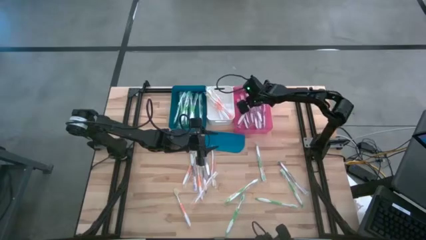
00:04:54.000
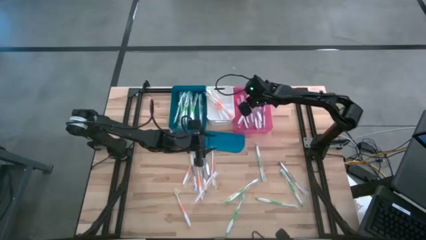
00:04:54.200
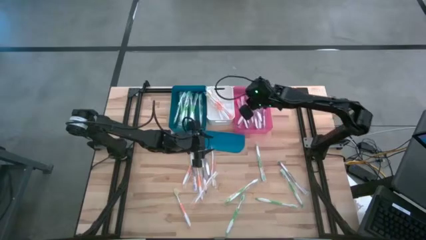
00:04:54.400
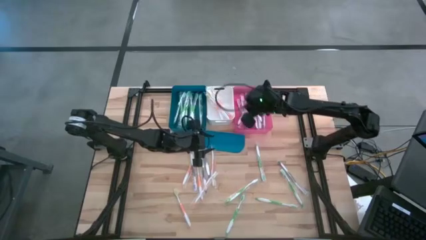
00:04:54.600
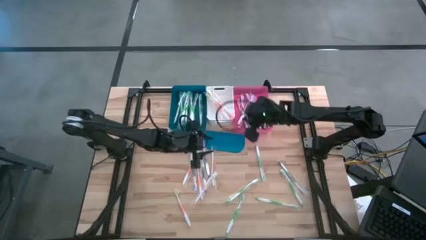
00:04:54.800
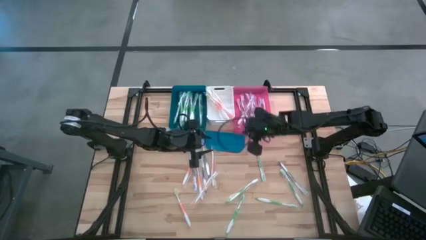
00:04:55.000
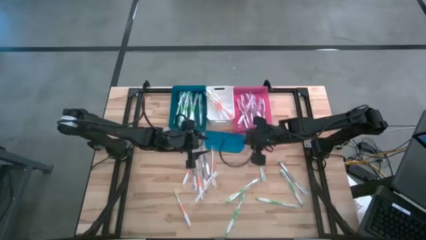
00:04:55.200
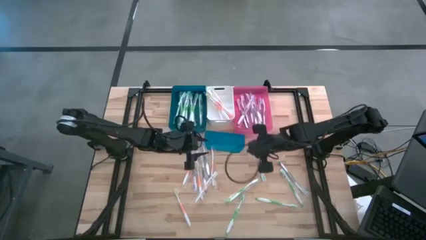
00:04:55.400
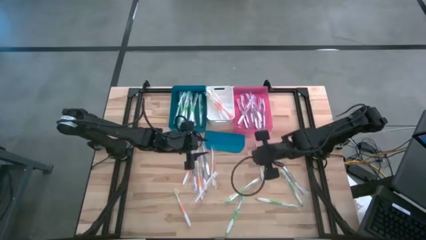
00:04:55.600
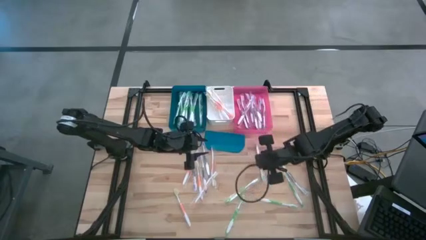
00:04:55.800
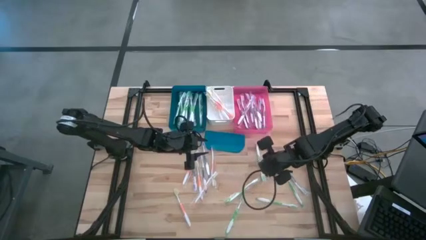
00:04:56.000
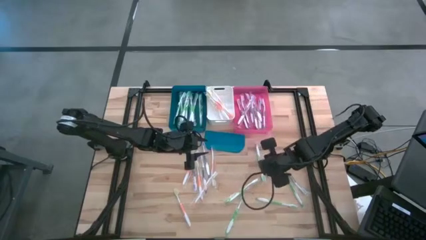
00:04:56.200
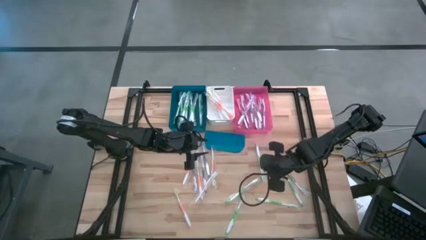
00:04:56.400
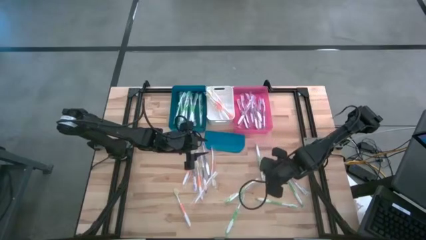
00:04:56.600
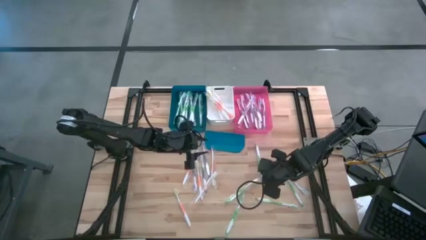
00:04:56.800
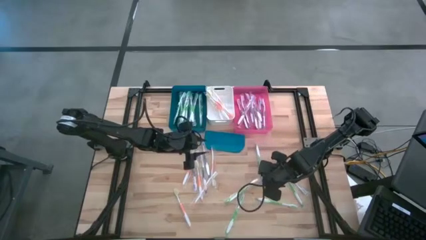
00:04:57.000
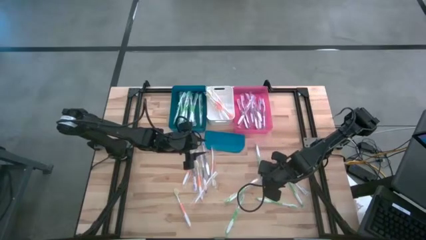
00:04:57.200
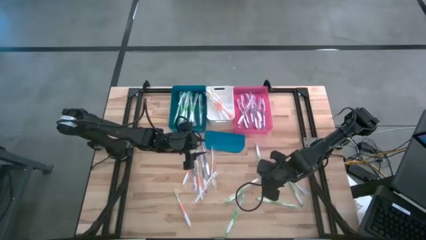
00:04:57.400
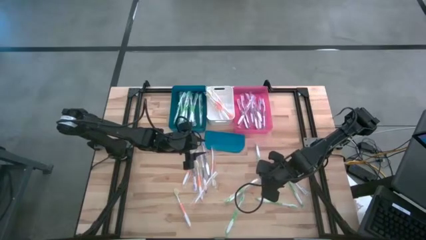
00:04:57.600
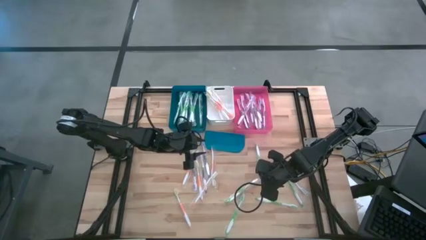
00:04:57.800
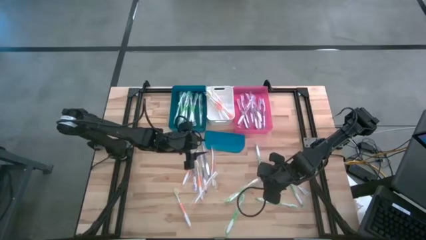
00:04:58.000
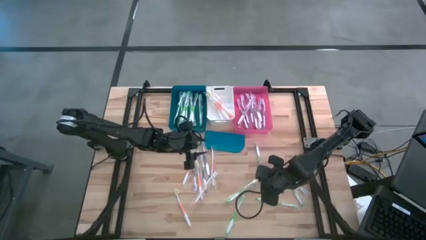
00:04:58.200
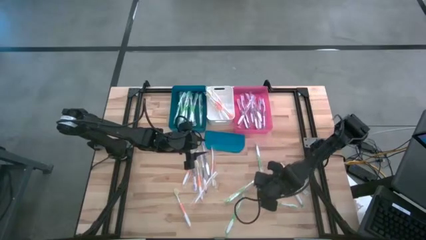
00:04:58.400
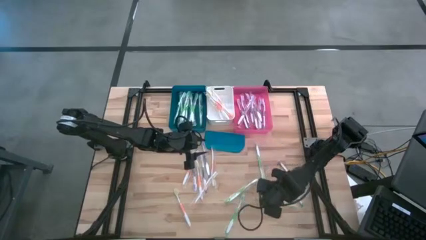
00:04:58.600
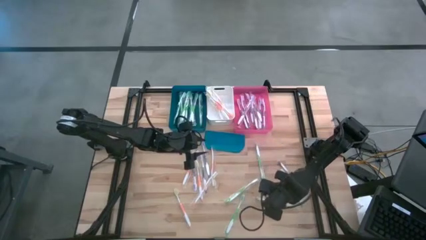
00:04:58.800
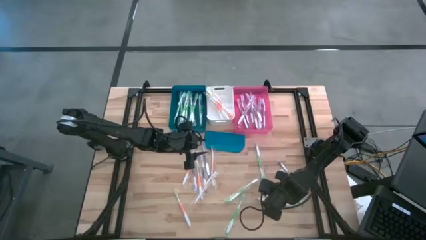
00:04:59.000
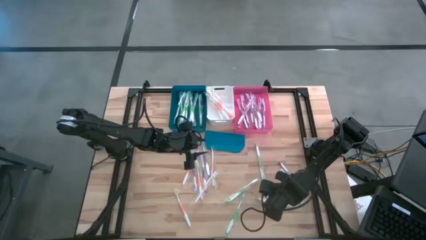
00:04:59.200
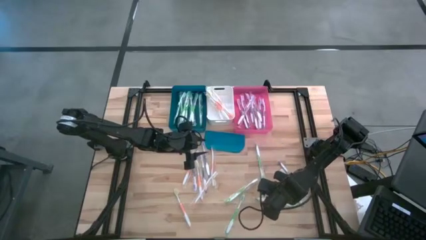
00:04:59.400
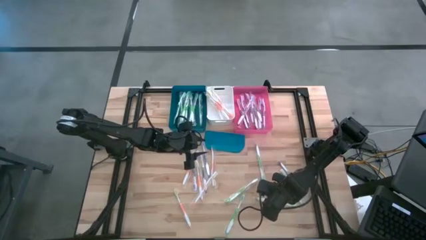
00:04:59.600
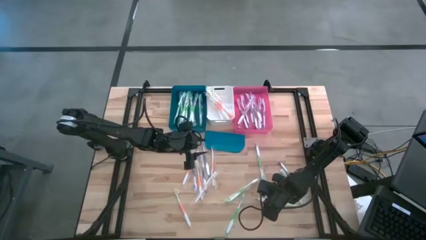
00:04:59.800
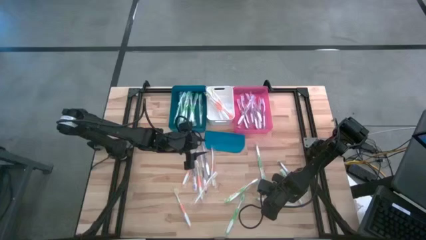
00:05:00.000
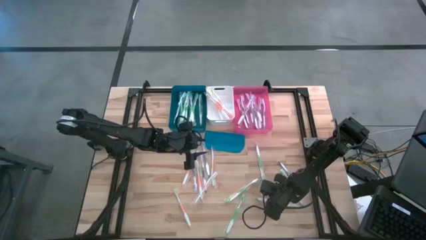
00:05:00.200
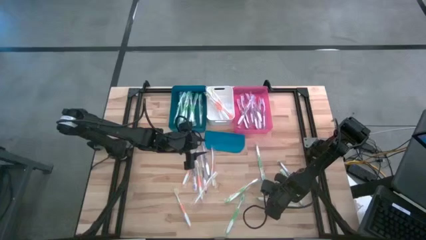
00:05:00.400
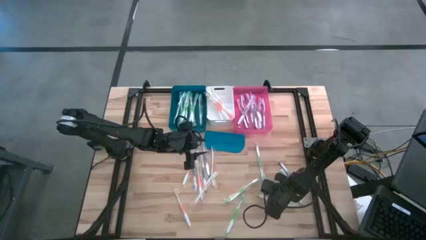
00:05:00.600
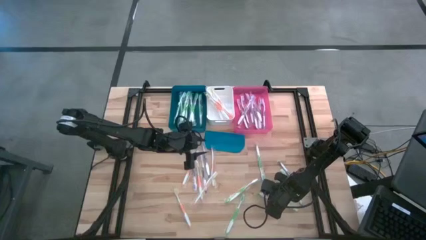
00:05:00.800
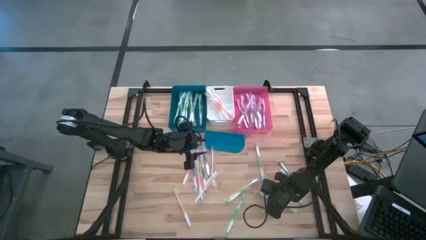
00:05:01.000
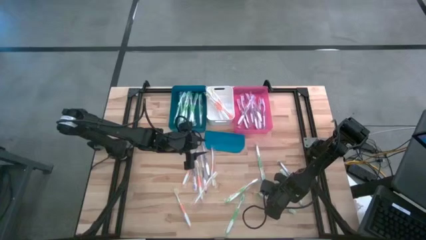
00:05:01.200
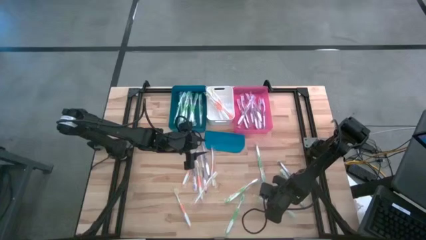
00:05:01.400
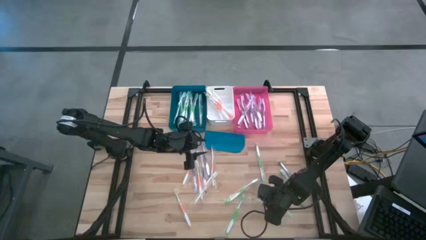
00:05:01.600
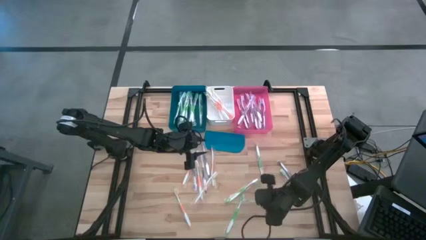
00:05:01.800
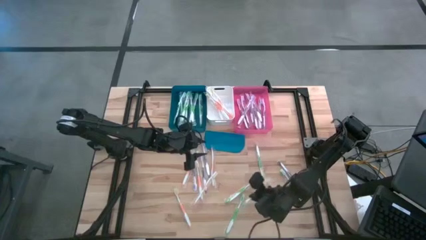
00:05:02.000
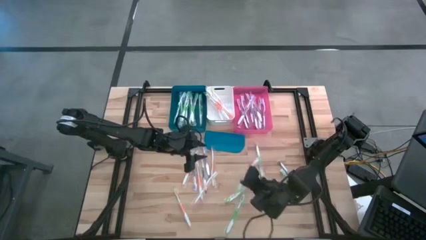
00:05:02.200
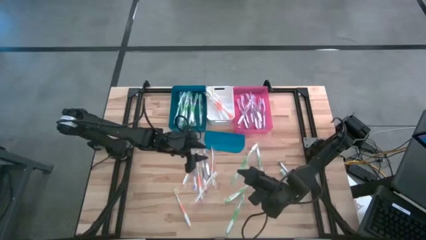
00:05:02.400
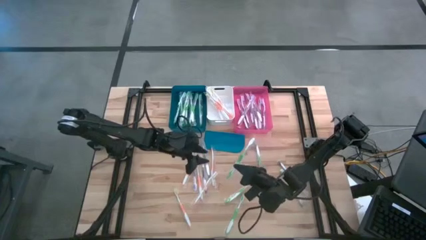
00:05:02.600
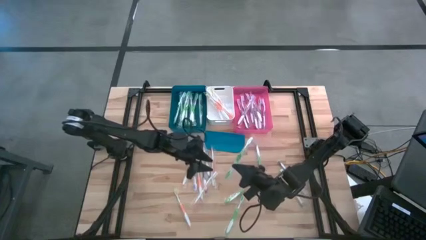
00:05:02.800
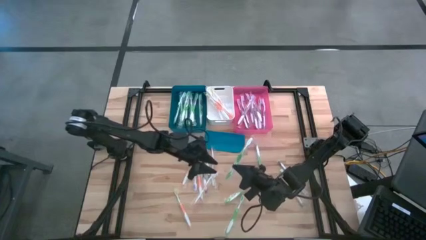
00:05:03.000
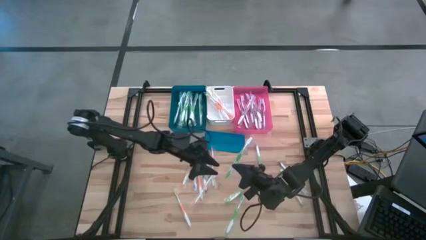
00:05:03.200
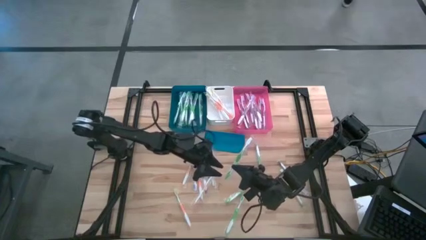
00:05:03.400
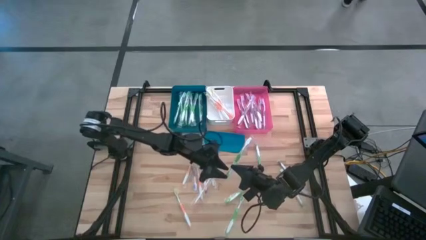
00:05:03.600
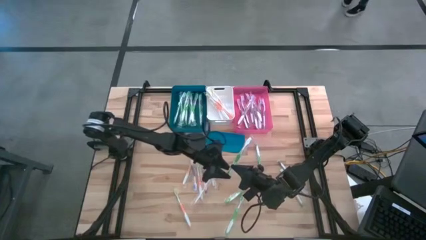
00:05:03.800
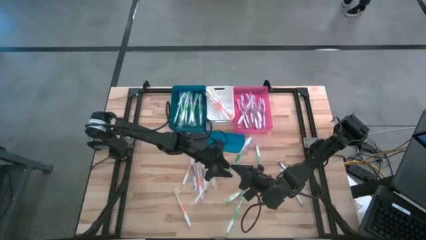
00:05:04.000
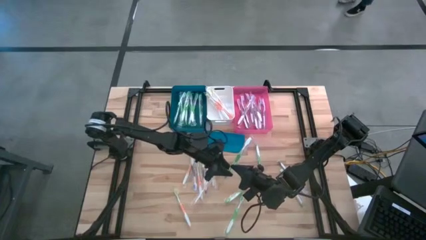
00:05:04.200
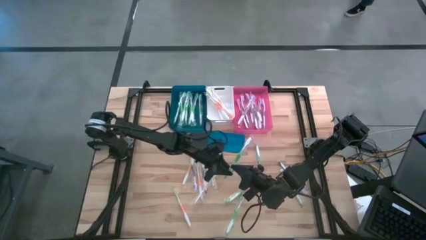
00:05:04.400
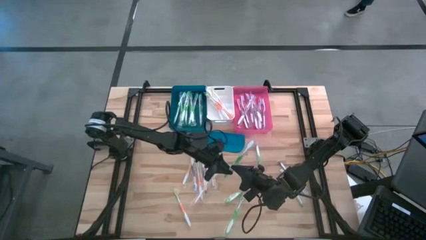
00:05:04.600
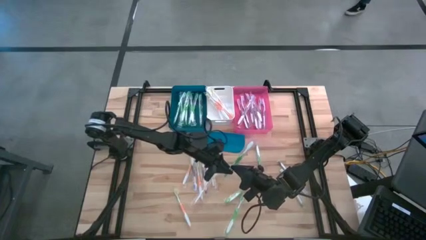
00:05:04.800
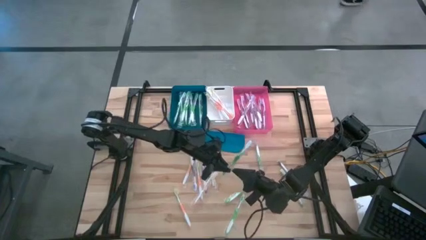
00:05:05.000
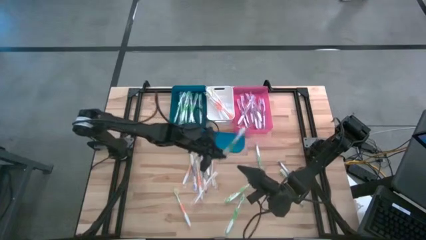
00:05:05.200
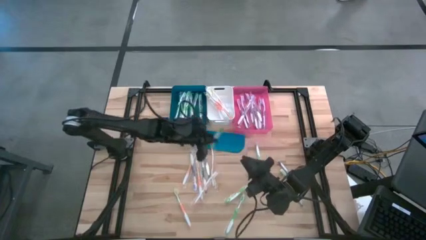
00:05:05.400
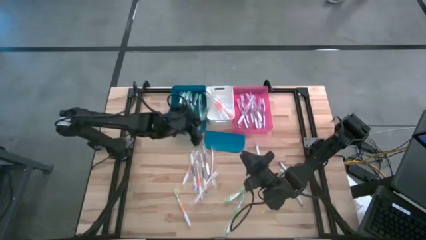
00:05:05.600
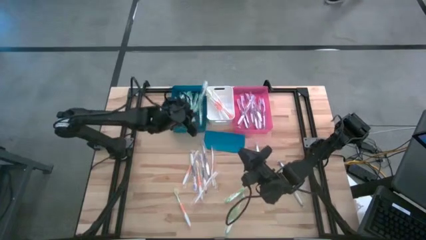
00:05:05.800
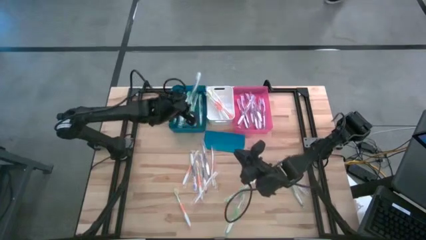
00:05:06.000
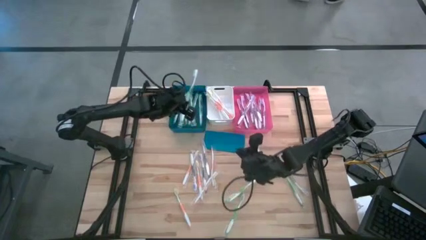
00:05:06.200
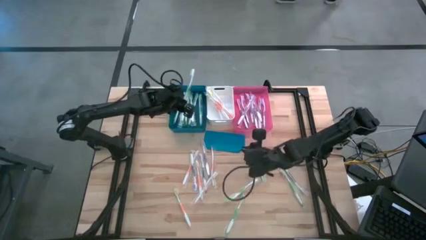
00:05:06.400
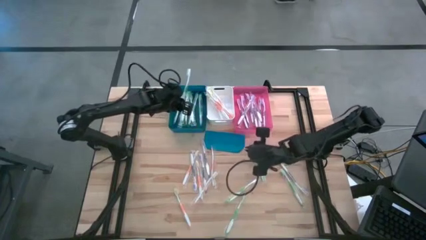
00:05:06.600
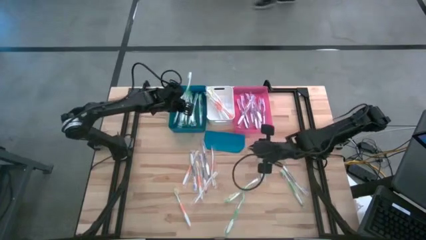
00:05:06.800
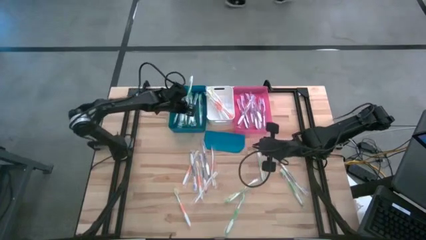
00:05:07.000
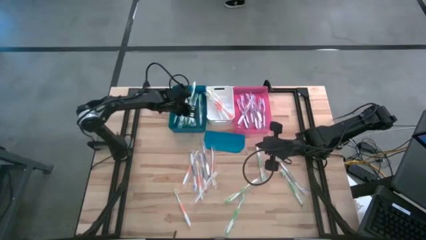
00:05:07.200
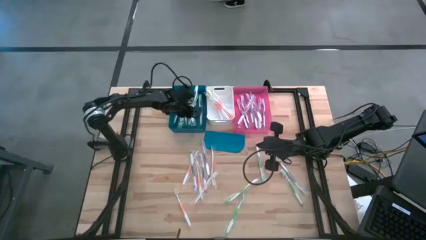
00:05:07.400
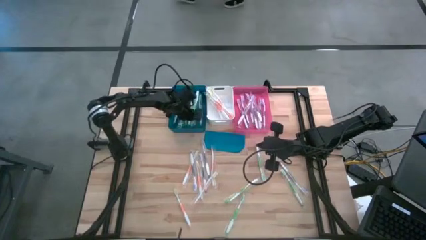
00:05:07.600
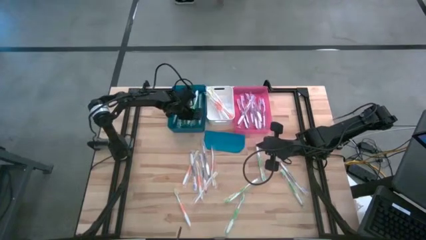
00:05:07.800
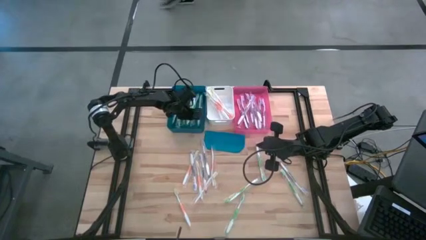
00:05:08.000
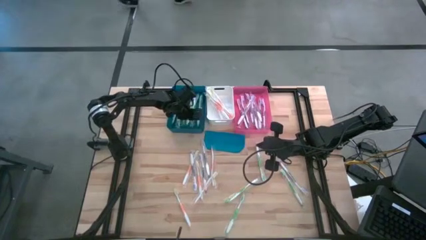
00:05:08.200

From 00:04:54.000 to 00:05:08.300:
Task: Pick & Place Toothbrushes
Put the green toothbrush into the blue bin
